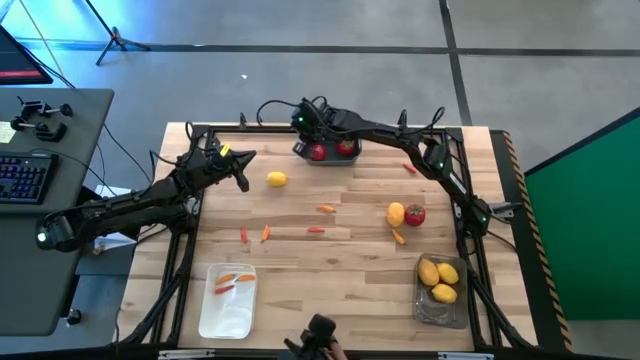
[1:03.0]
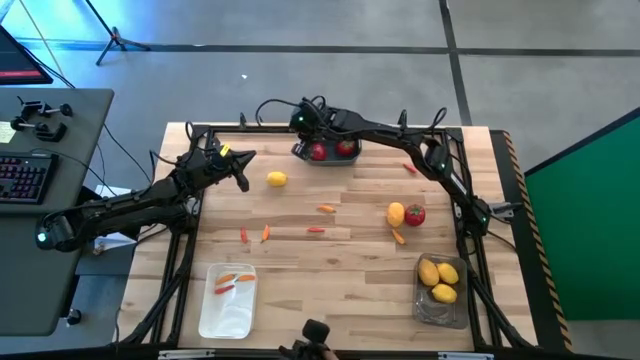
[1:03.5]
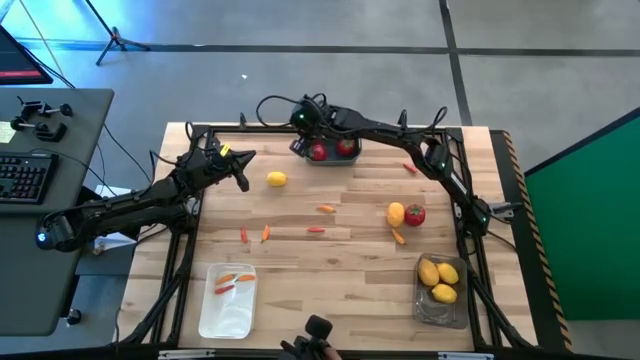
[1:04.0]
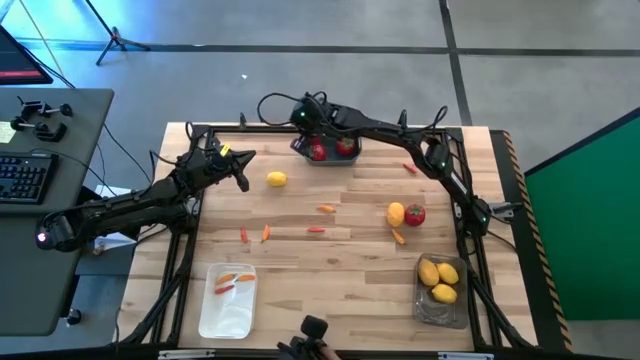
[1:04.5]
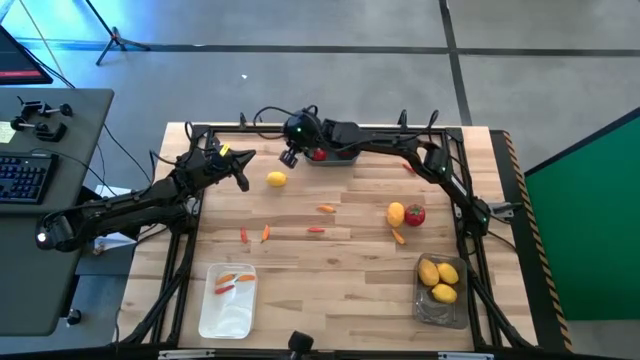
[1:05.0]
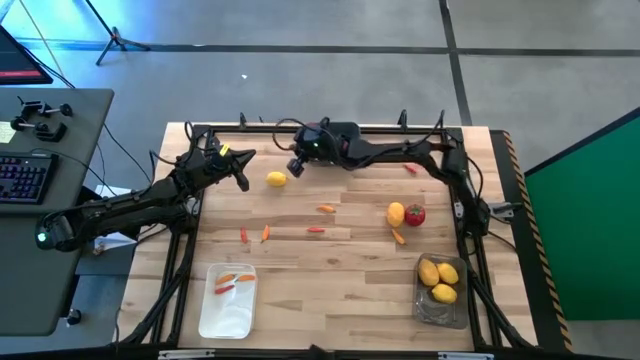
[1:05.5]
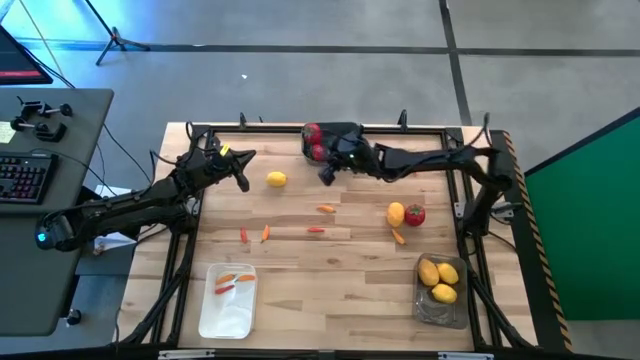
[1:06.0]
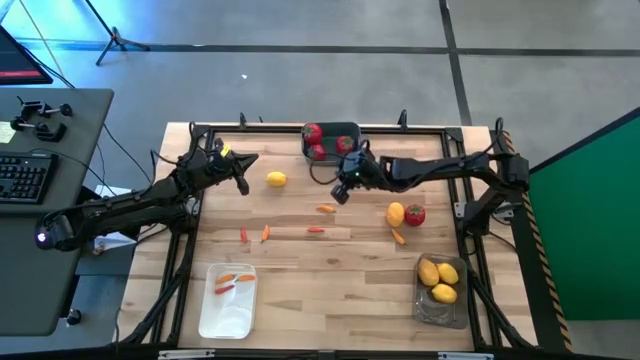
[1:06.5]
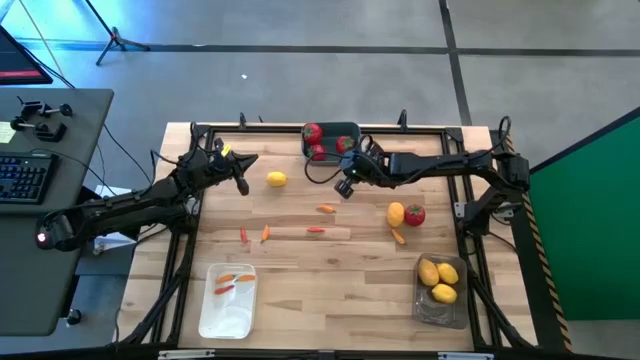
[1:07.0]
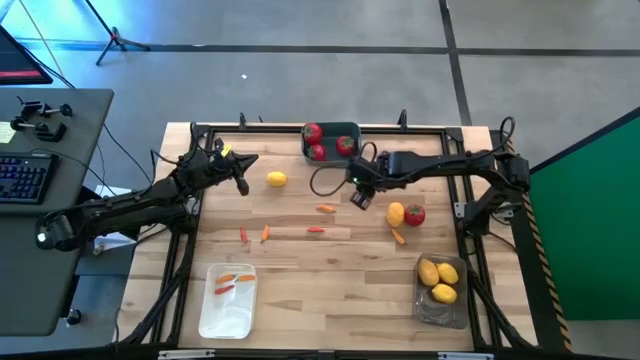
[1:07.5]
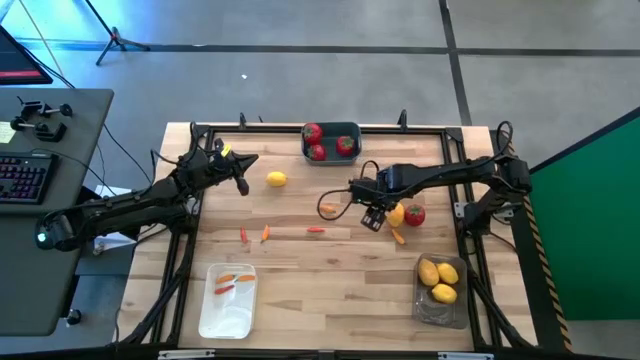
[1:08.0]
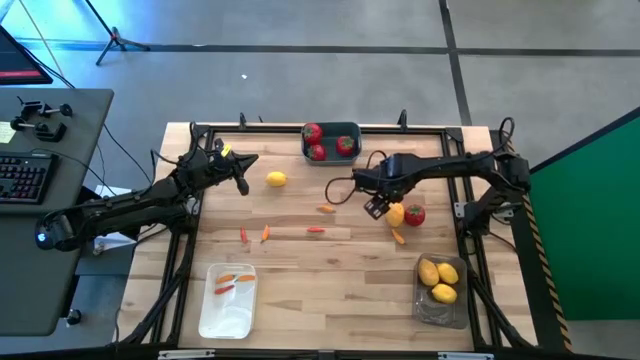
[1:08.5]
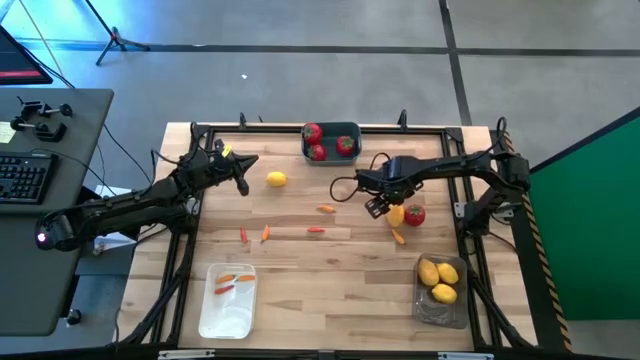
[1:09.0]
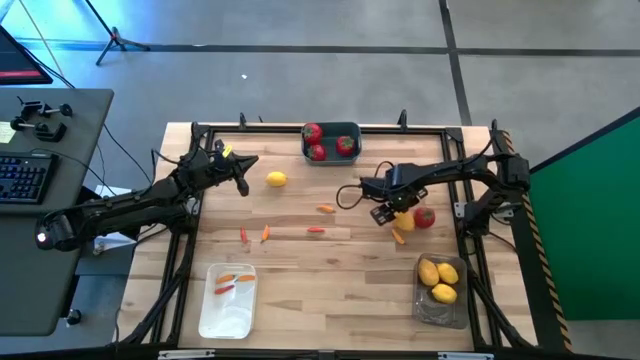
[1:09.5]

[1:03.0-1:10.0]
Task: Sort produce into baskets
Put the right yellow lemon into the black transparent bin

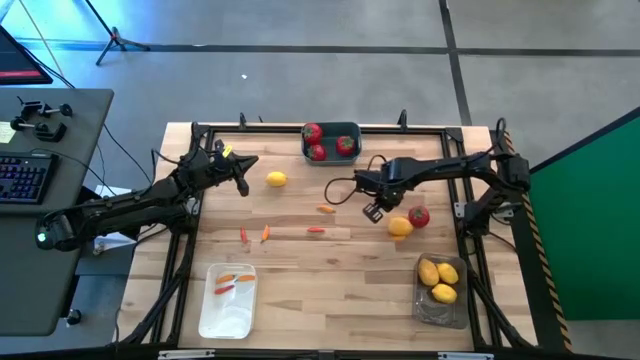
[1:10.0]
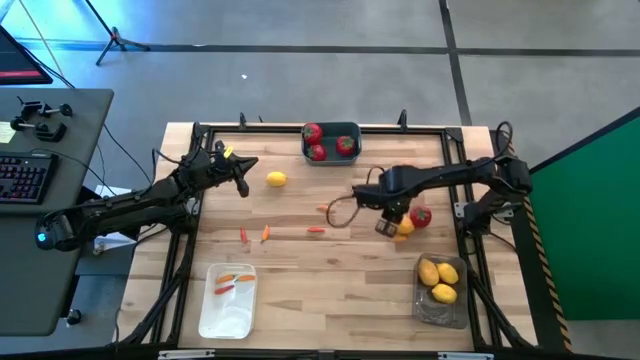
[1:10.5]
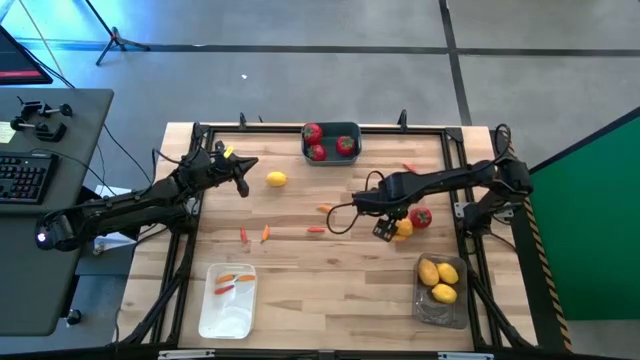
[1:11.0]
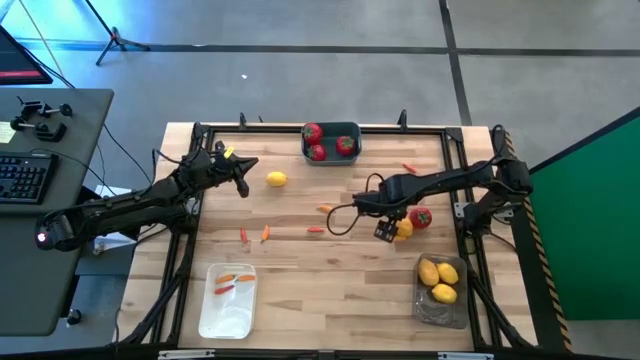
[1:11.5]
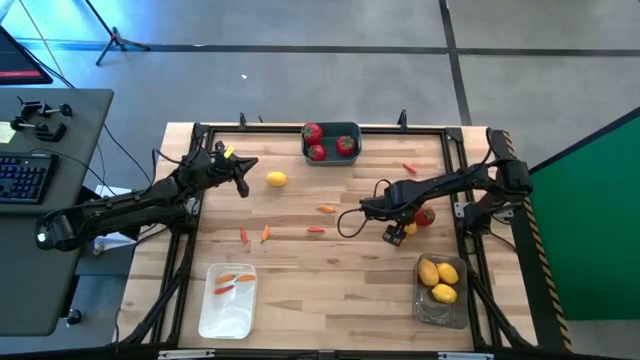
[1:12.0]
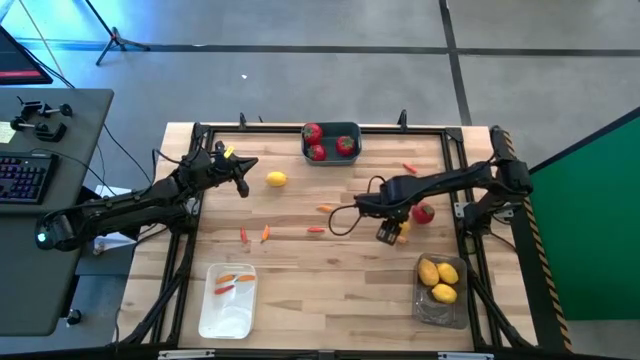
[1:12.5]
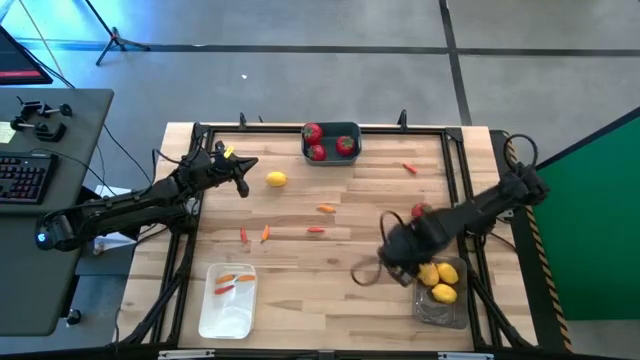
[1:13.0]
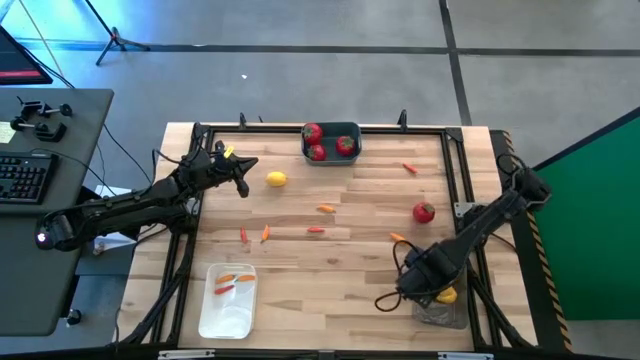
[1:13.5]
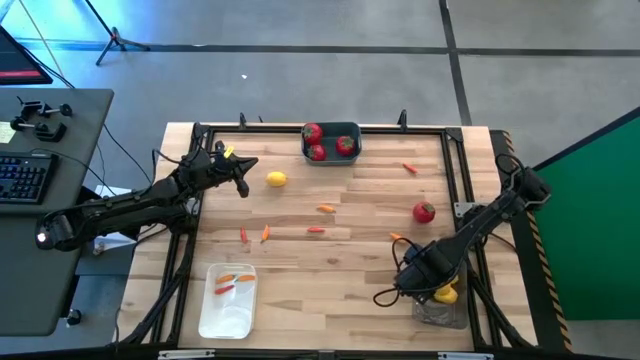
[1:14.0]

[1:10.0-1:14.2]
Put the right yellow lemon into the black transparent bin

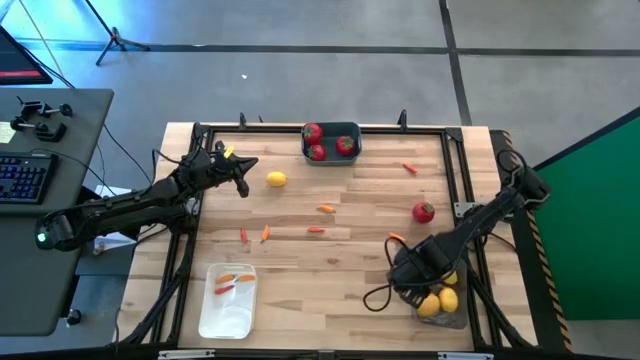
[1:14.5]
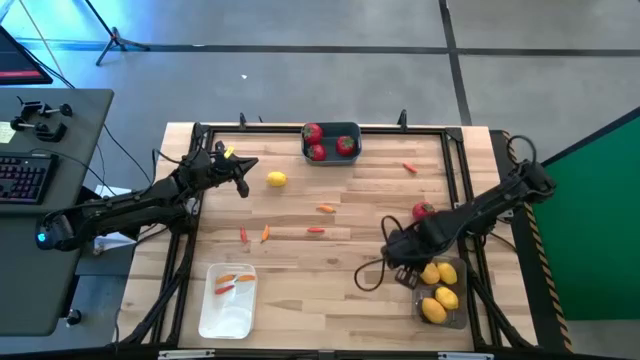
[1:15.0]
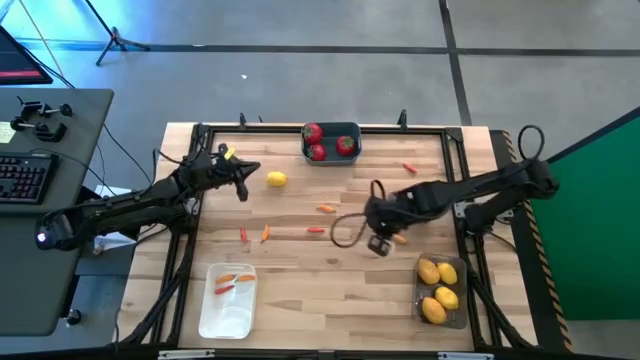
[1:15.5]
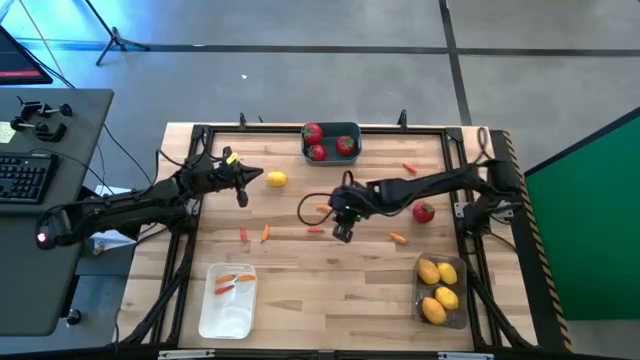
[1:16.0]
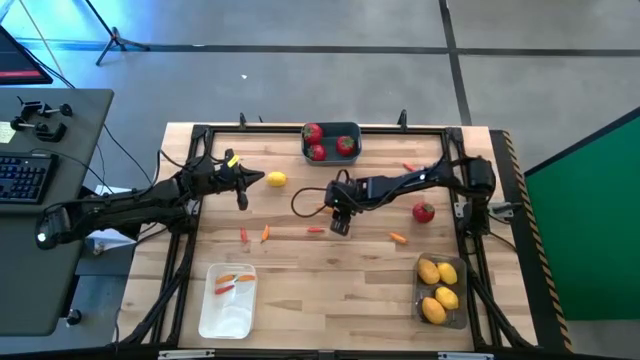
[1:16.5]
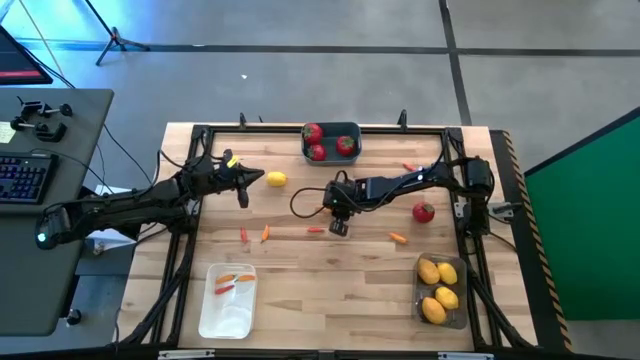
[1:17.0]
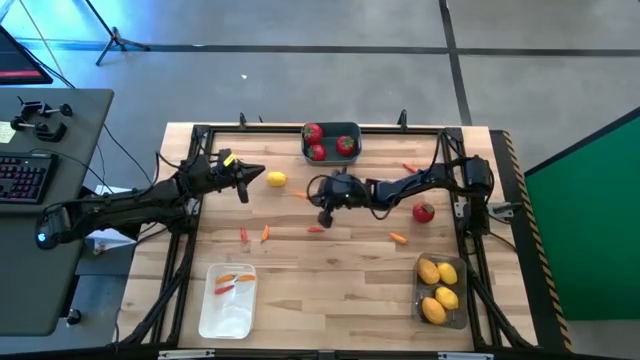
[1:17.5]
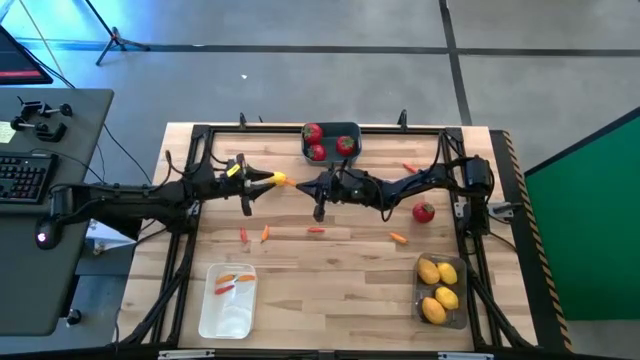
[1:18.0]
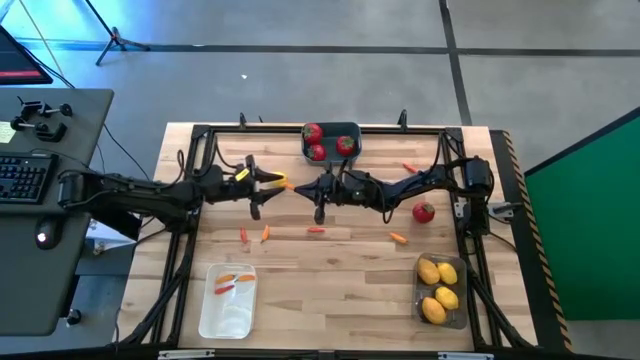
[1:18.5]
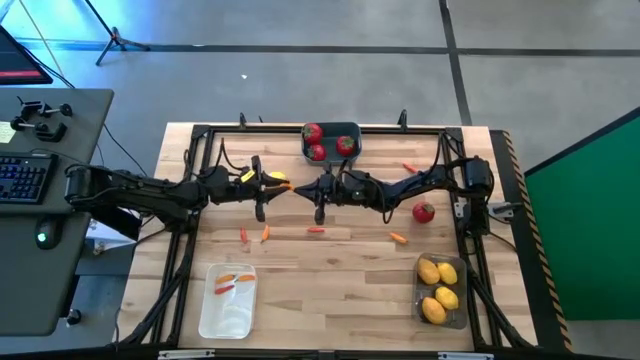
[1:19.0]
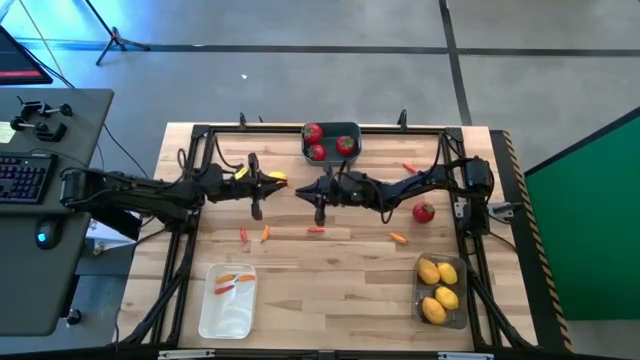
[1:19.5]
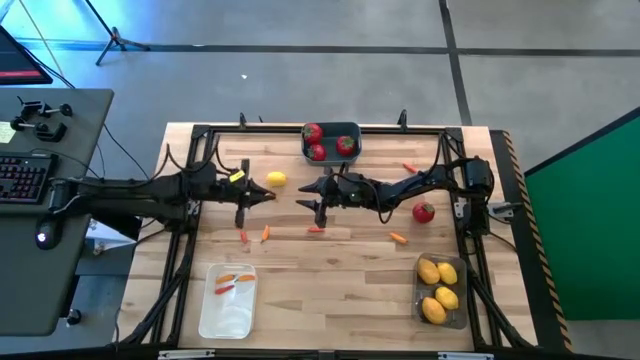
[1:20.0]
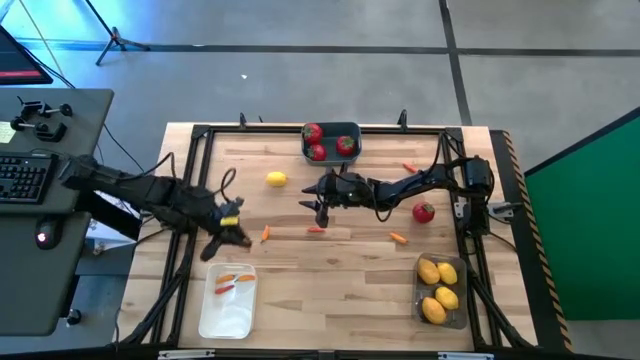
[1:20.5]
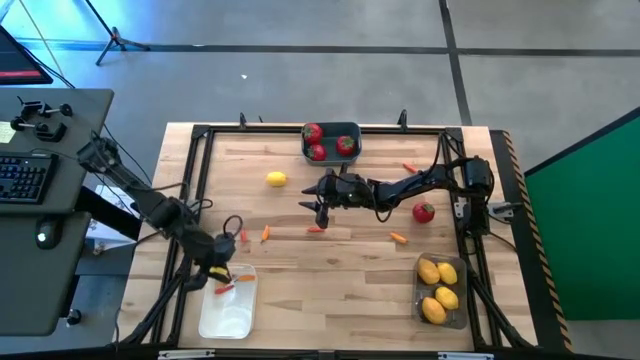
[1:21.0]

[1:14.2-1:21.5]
Put the top center orange chili pepper into the white bin

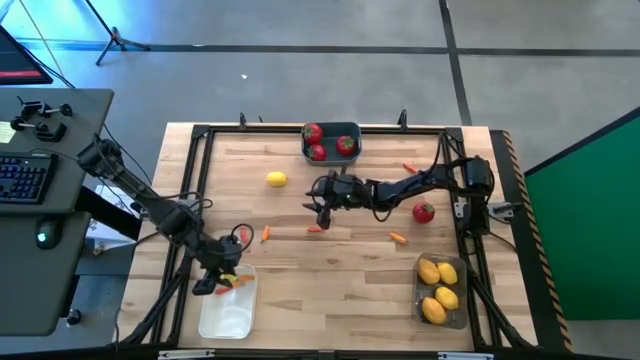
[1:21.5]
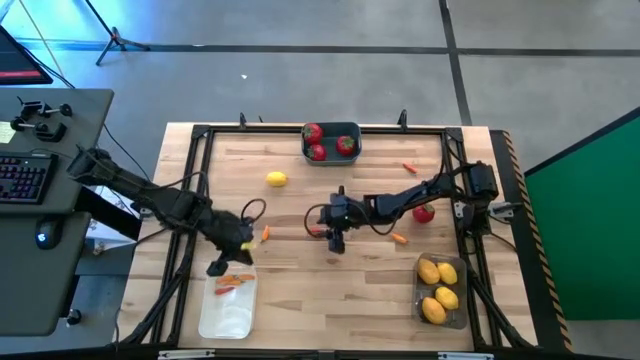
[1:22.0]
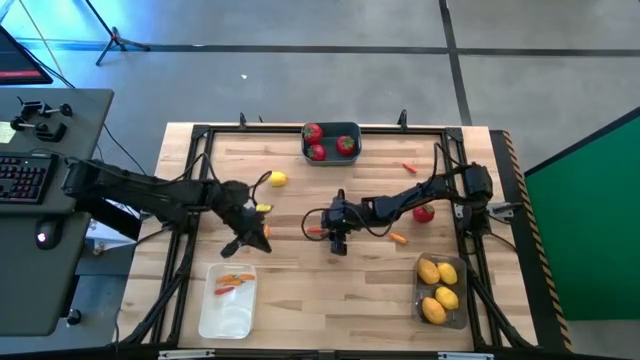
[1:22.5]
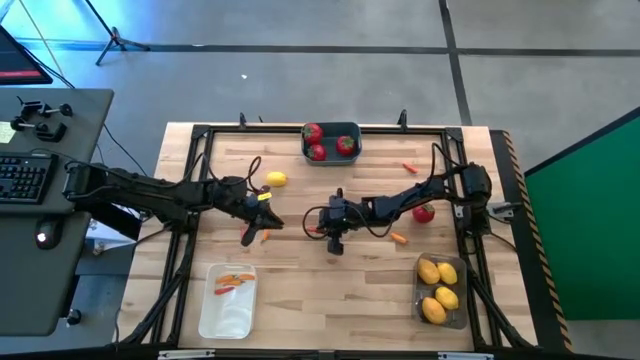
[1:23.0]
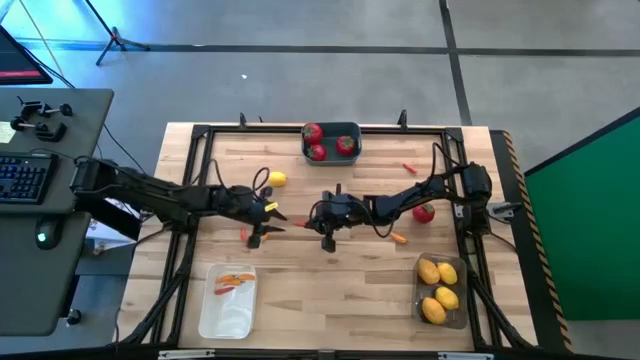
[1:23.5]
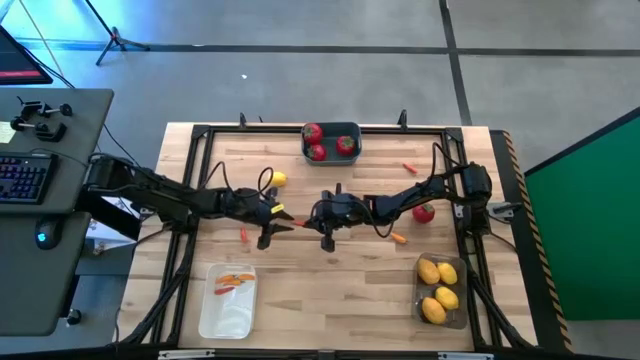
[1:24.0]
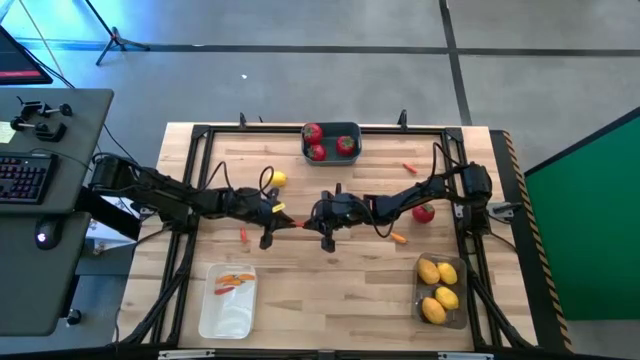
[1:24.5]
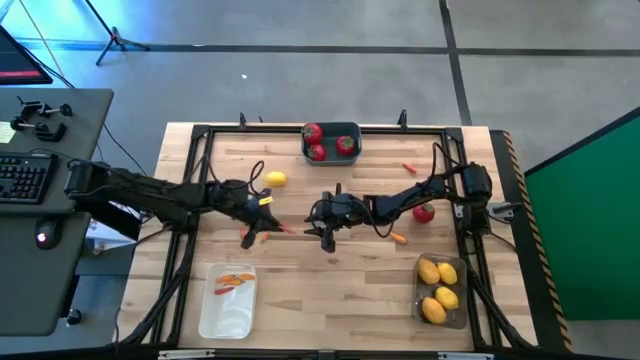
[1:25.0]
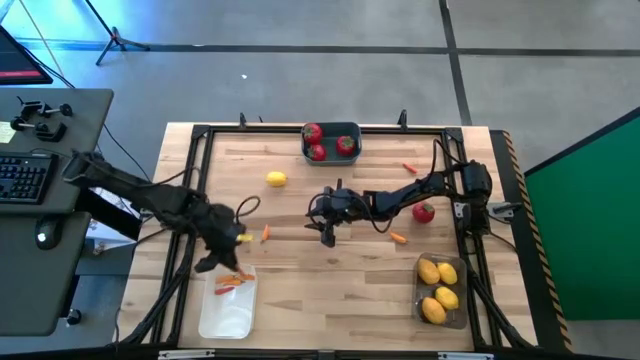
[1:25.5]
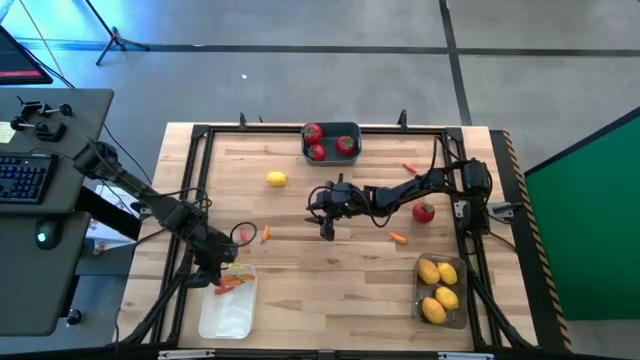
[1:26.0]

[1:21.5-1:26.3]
Put the bottom center red chili pepper into the white bin
